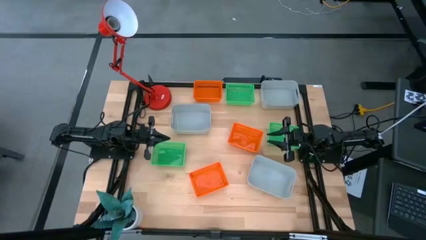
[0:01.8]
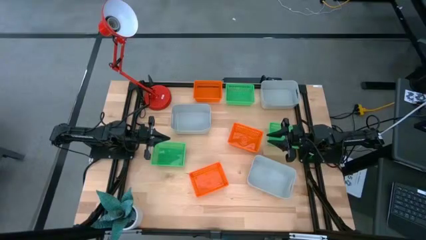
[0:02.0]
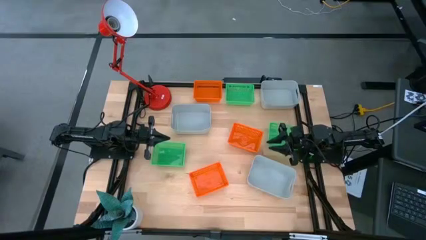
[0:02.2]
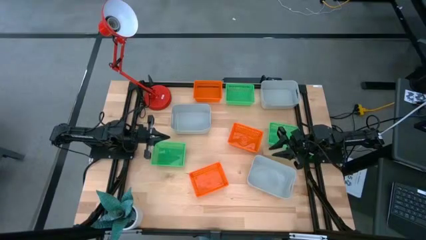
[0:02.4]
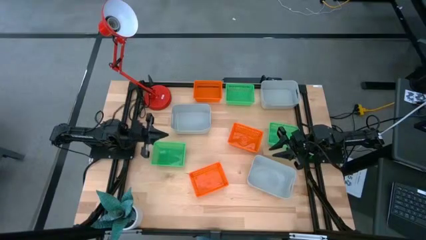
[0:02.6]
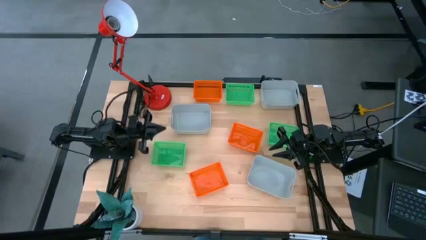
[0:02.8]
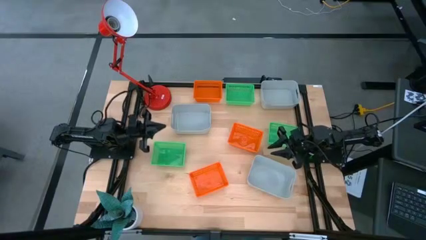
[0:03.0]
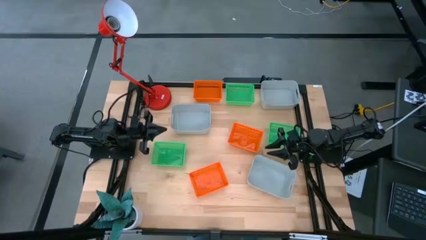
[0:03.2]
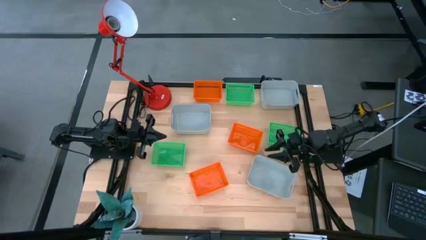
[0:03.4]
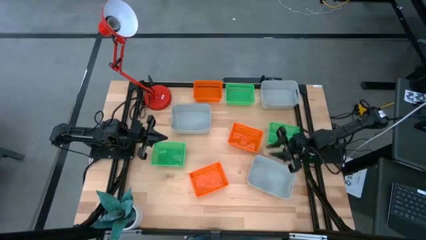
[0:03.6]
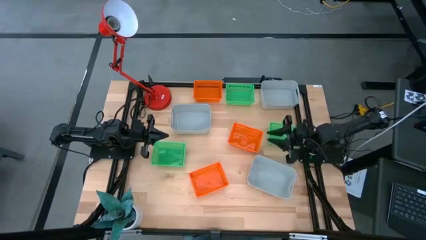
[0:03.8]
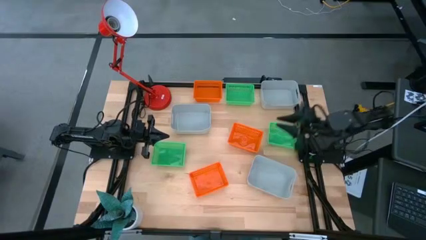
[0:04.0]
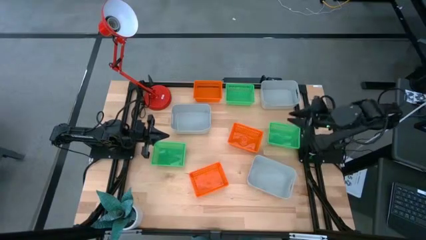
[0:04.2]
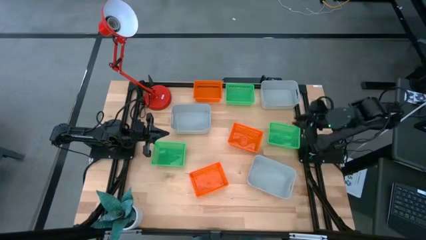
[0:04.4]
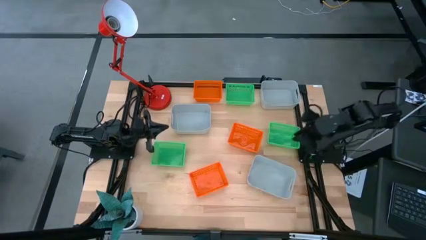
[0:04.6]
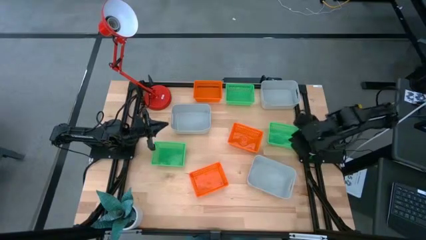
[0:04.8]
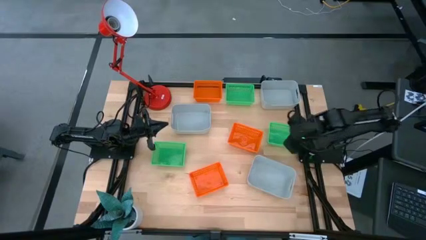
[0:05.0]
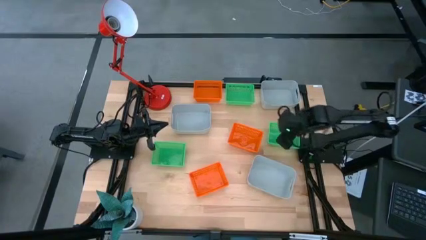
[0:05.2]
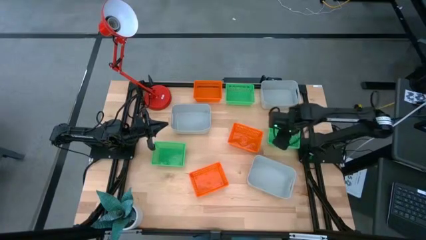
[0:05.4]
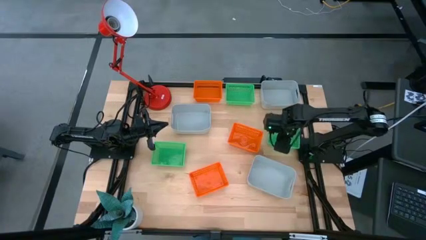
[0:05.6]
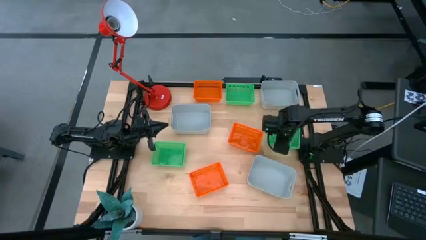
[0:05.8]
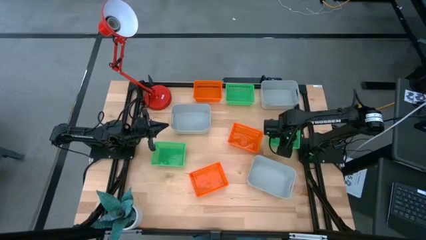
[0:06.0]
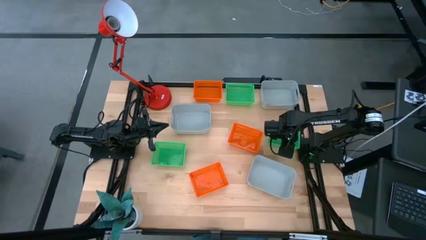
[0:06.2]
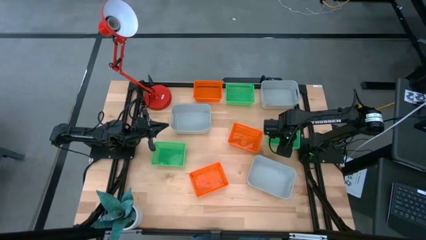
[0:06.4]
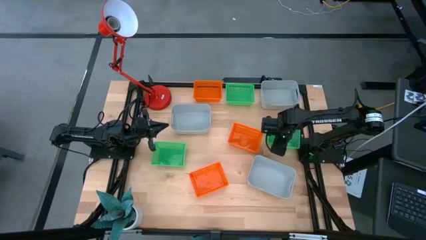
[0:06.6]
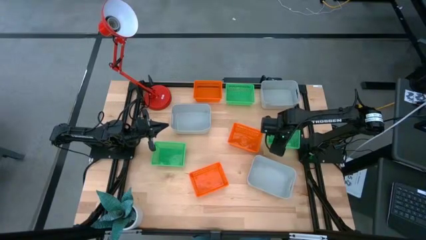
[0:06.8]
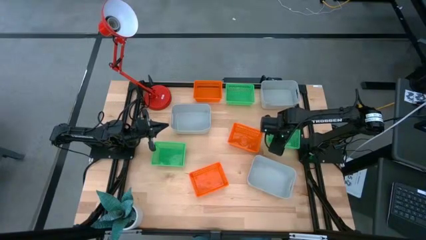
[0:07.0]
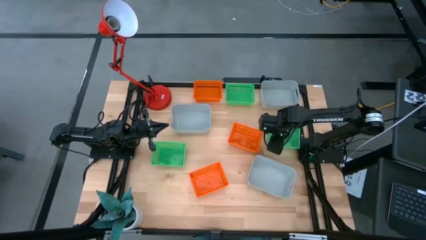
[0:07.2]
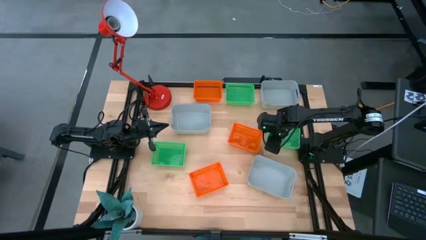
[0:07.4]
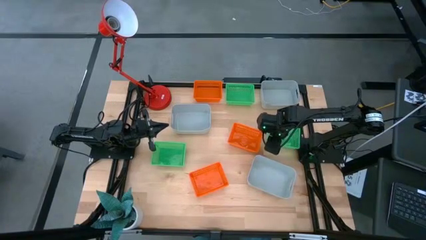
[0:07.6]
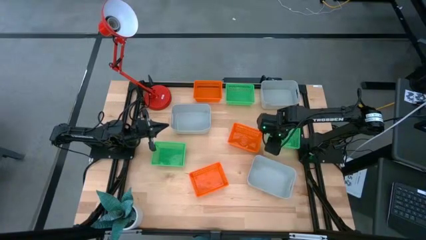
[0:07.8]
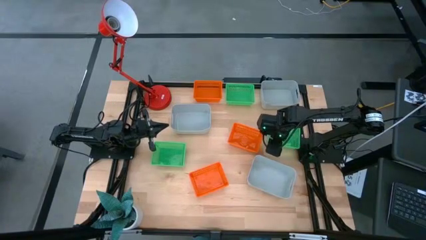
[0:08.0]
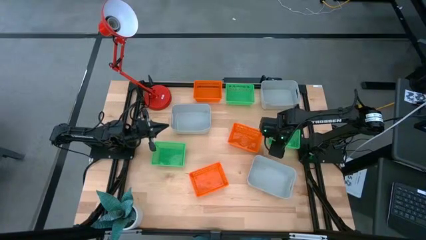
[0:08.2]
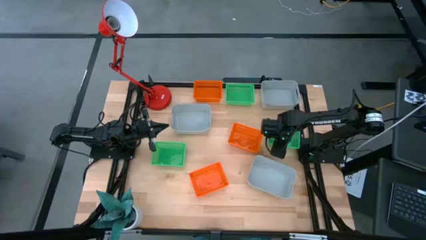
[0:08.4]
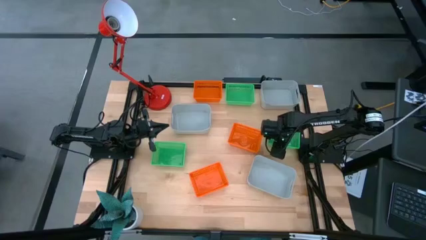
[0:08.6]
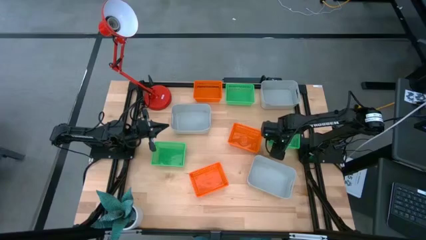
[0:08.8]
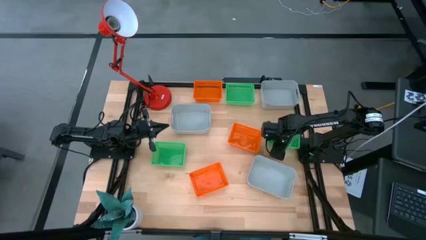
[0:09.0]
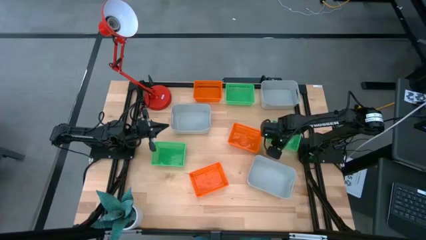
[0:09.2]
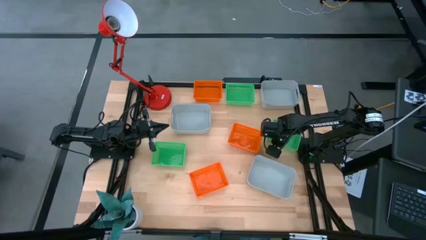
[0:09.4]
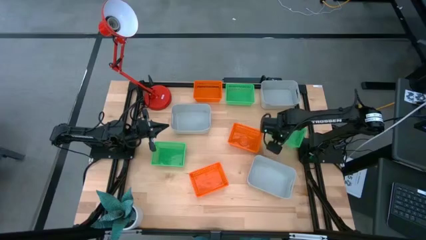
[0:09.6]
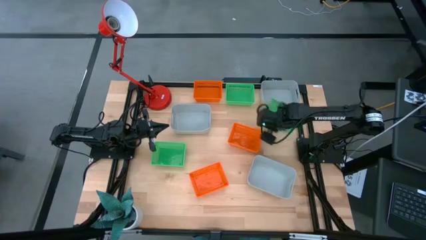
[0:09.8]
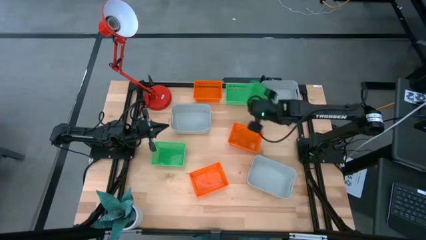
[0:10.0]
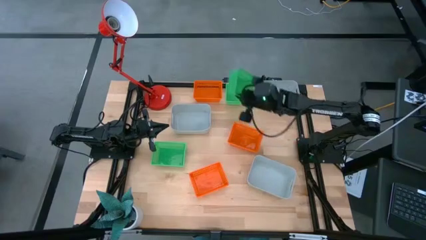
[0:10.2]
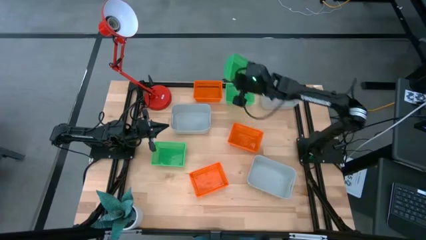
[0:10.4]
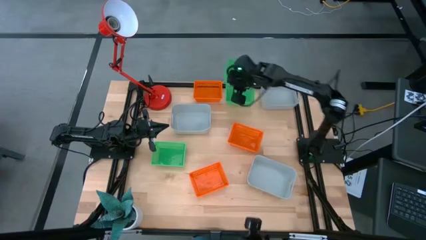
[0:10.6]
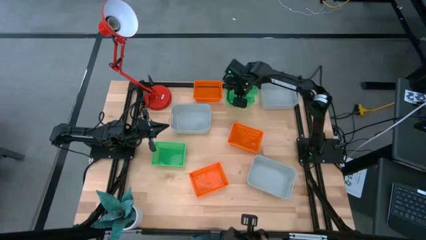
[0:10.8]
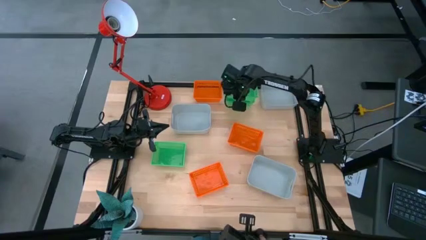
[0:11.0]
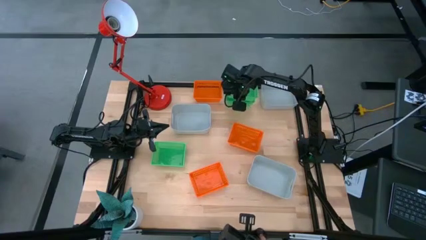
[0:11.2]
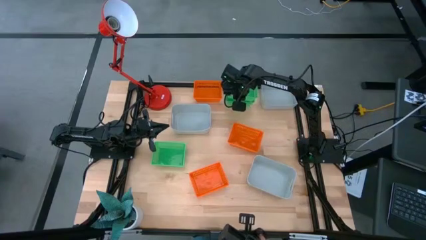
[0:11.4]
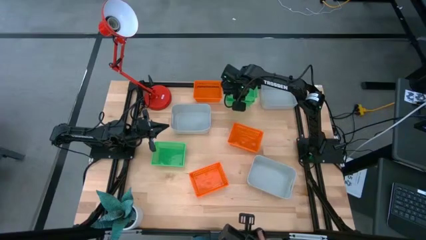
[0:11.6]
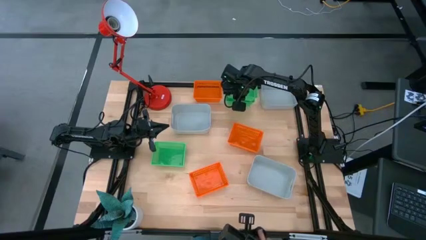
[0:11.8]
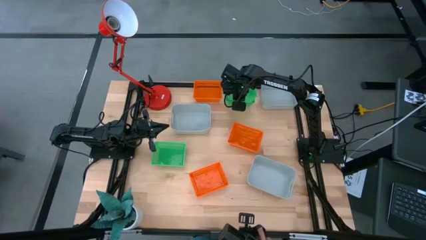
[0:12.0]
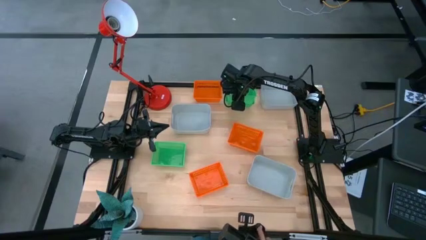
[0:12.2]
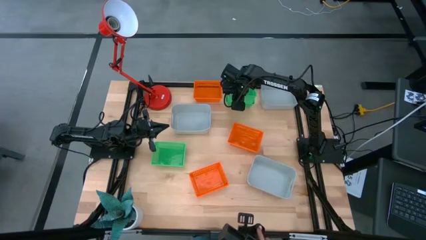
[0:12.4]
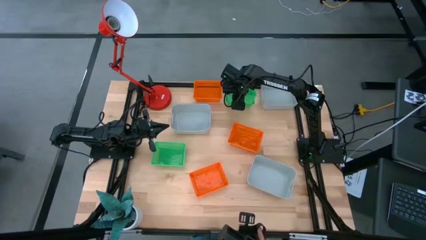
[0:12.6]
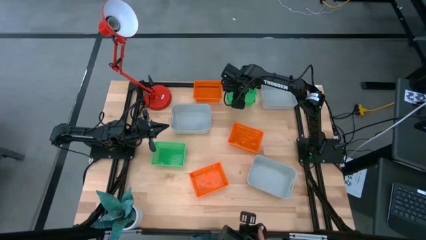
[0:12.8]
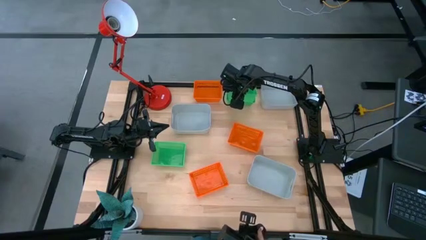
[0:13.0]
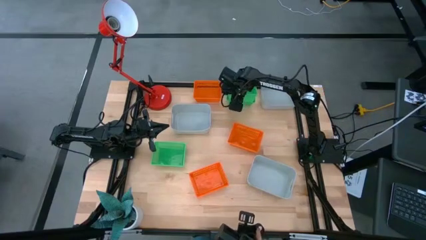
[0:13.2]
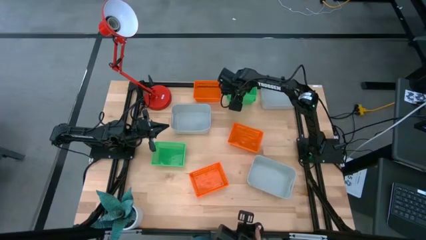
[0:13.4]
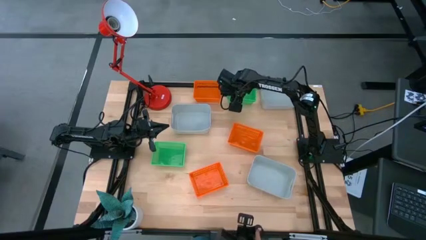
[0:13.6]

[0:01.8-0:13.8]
Stack the right green bin on the top green bin
